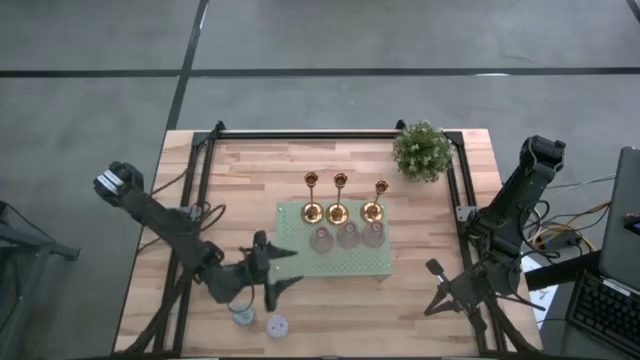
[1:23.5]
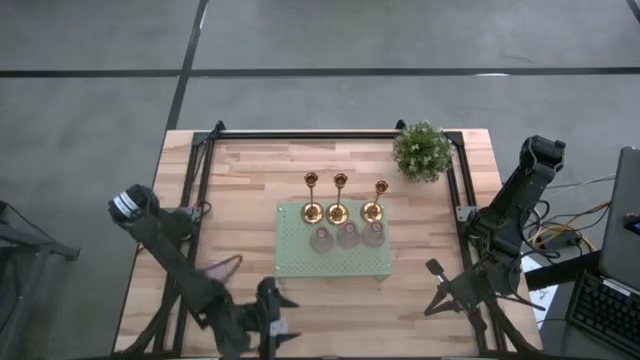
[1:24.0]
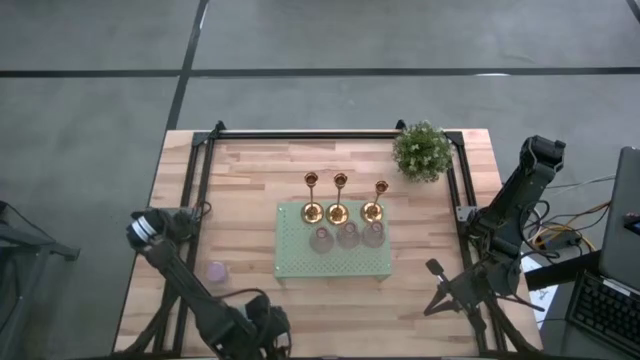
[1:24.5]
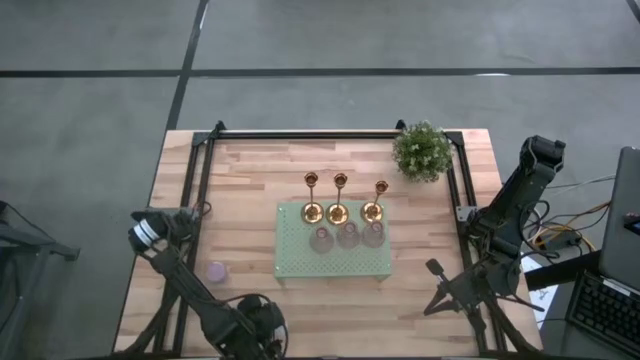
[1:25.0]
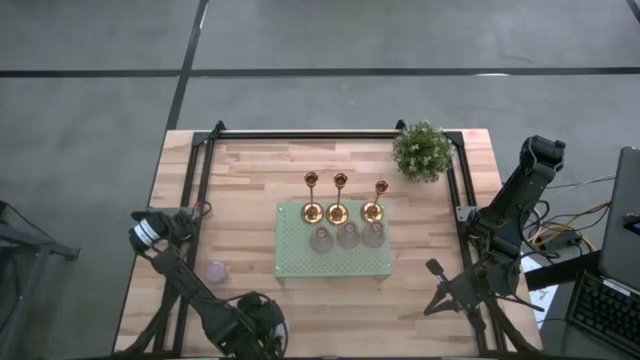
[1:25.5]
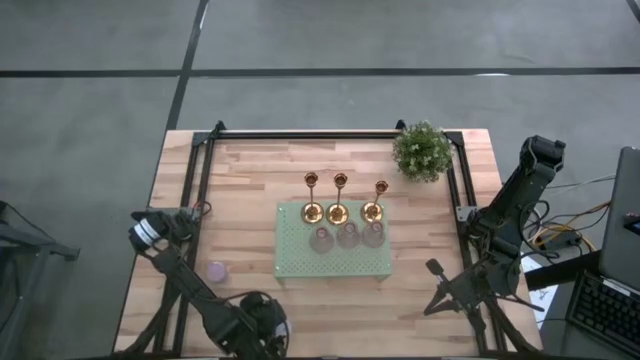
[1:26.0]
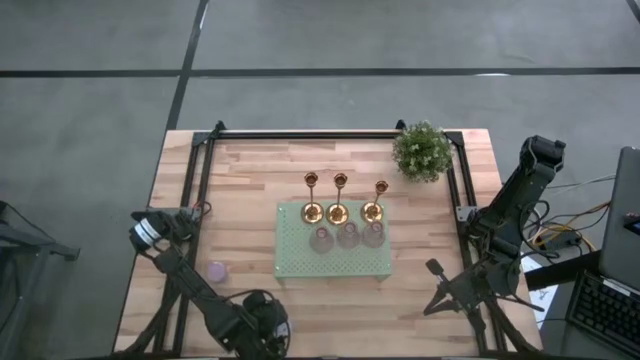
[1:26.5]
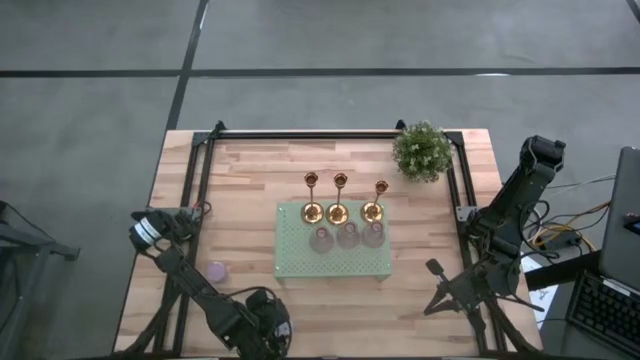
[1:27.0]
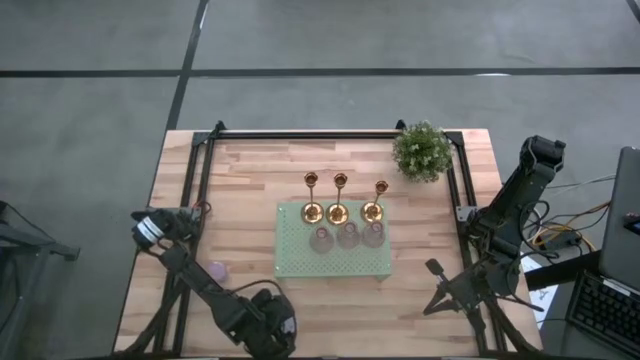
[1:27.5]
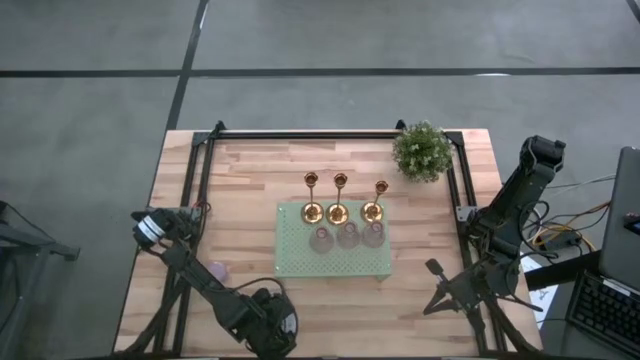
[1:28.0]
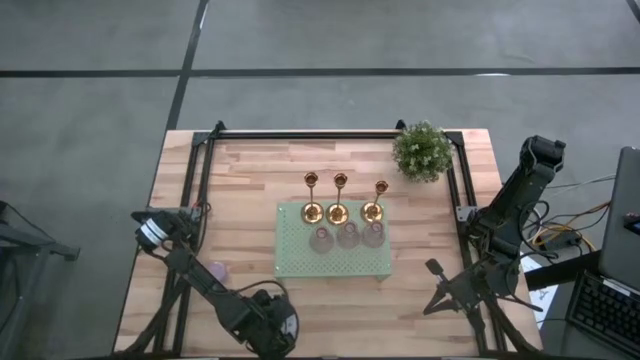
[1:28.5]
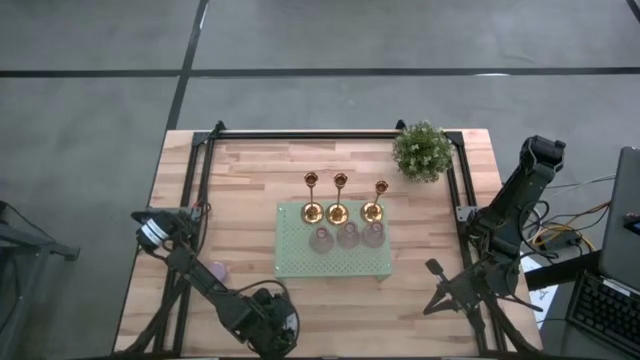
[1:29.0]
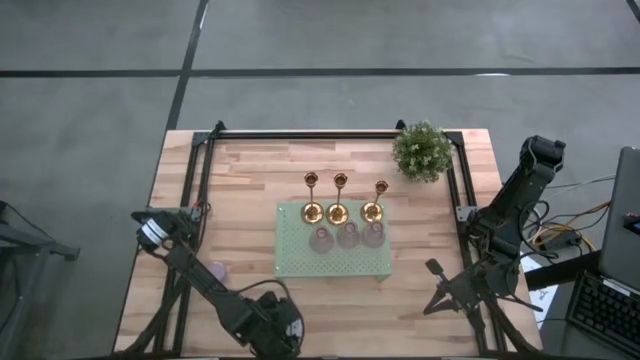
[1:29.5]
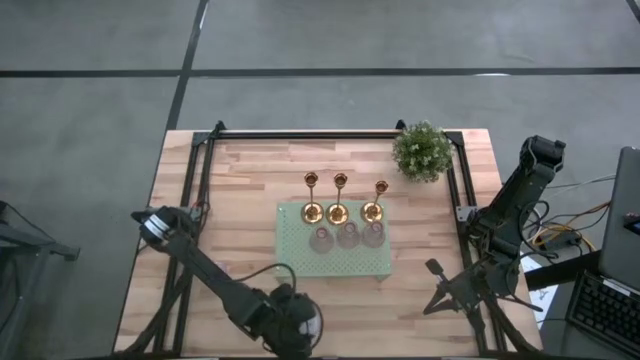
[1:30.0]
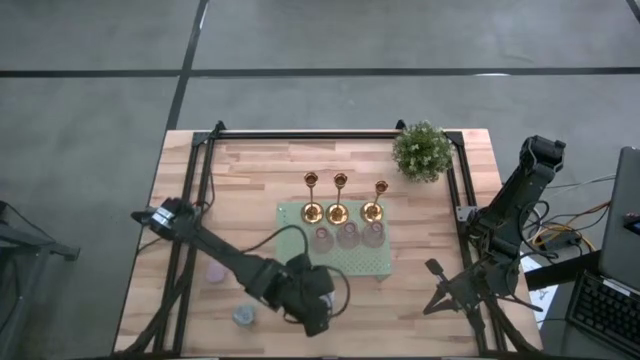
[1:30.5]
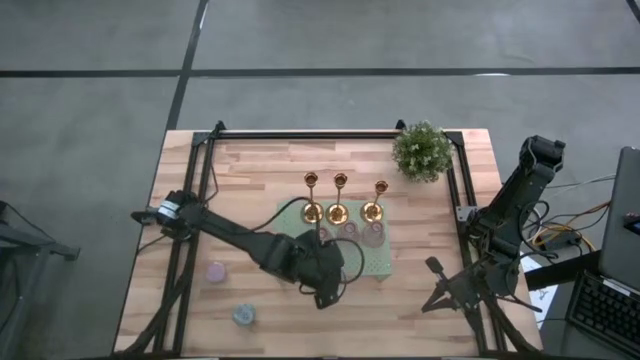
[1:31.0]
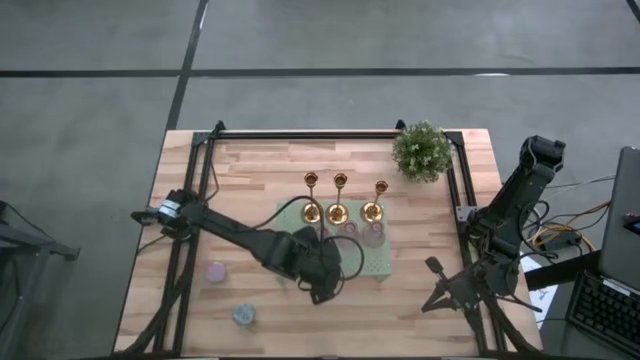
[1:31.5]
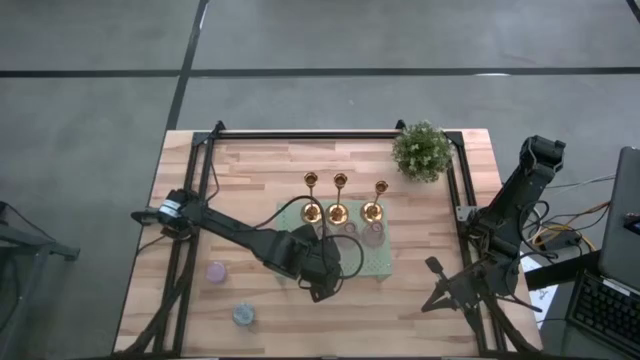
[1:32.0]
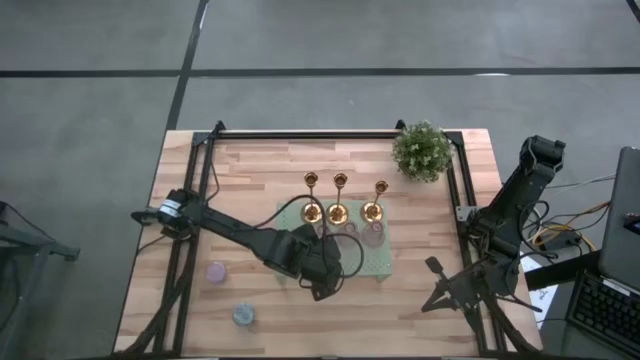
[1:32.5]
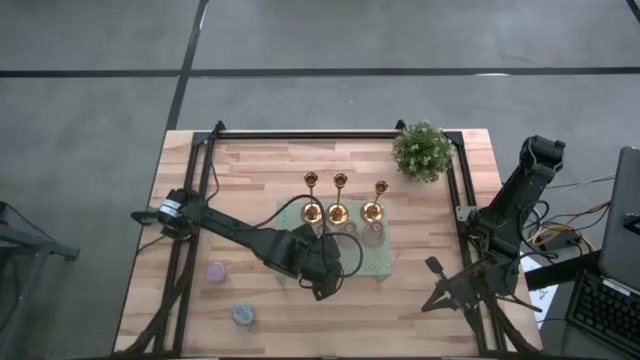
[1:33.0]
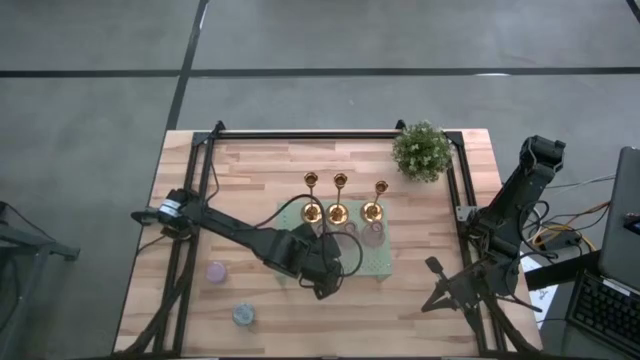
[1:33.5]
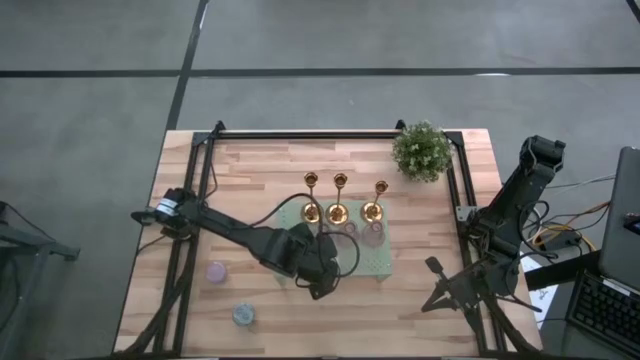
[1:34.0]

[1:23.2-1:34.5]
Task: Pick & Place candle stick holders
Put the white scented candle on the shelf

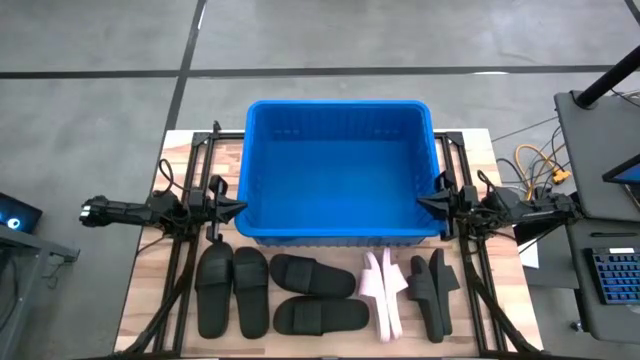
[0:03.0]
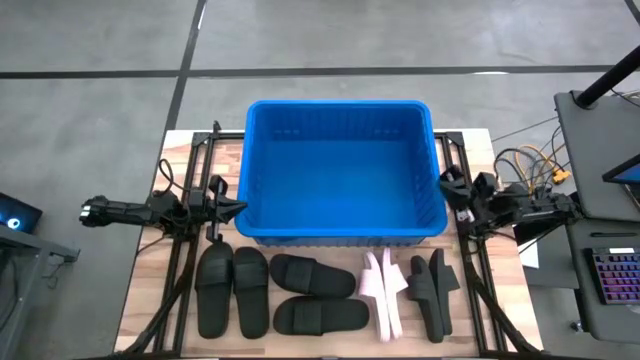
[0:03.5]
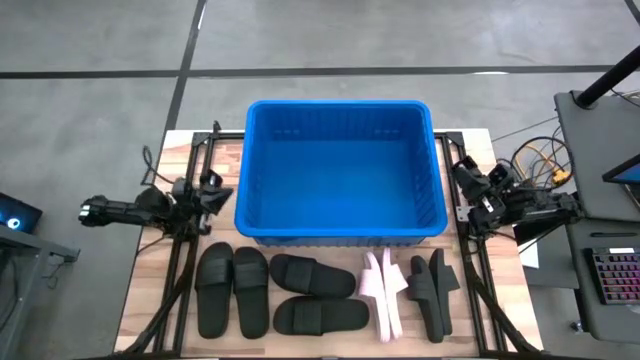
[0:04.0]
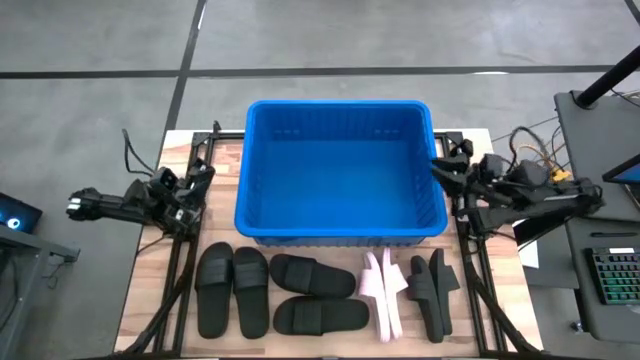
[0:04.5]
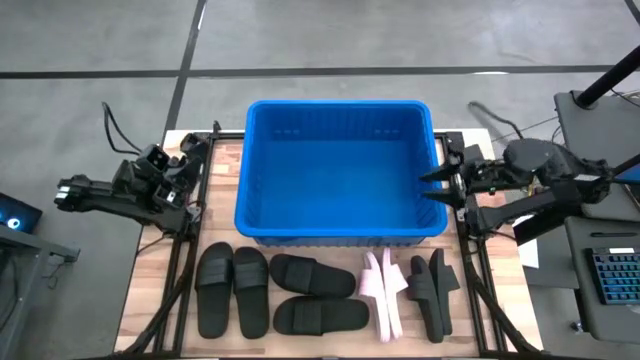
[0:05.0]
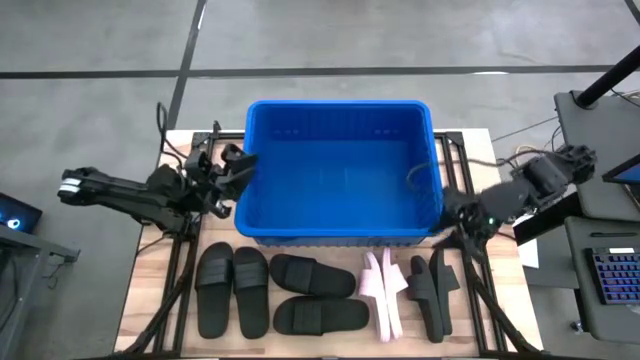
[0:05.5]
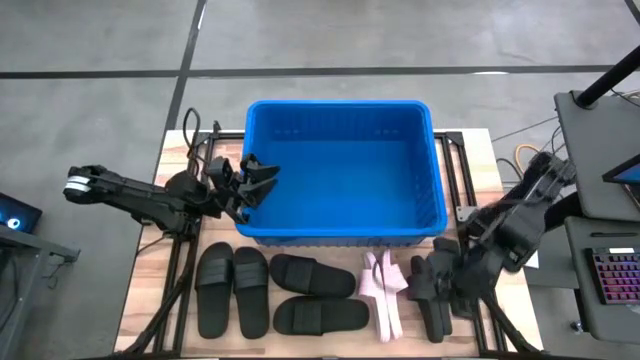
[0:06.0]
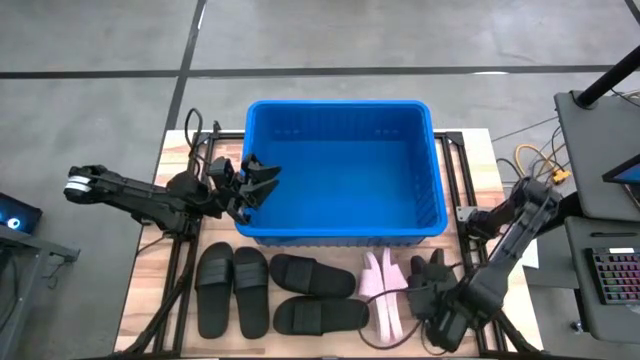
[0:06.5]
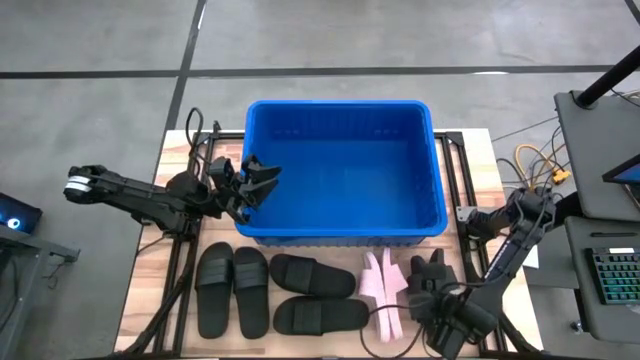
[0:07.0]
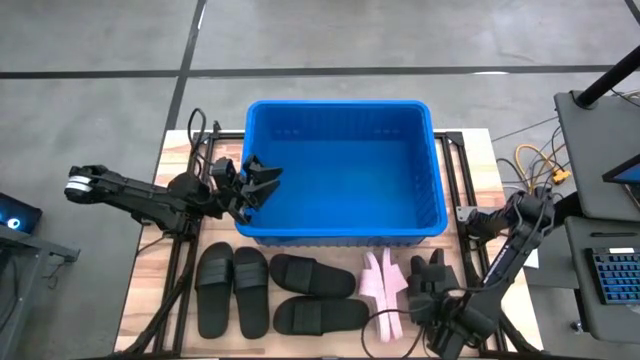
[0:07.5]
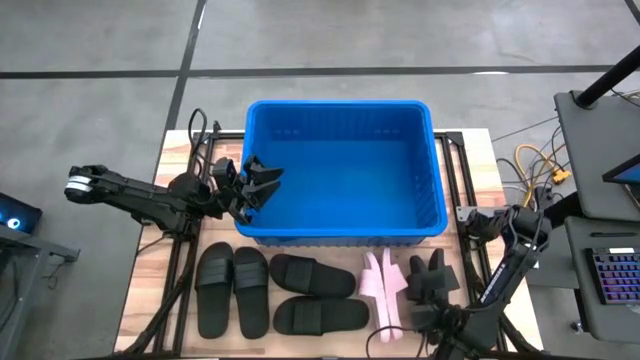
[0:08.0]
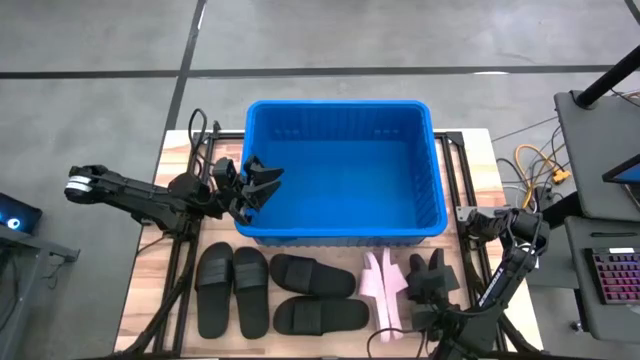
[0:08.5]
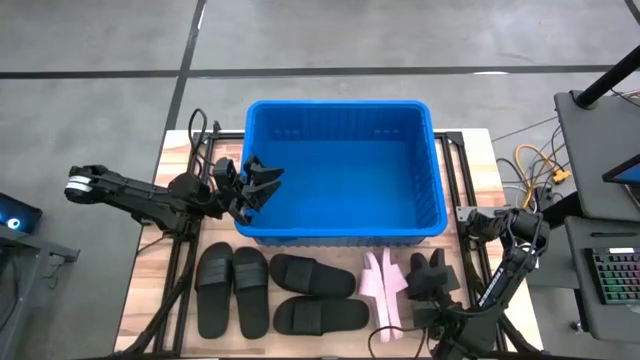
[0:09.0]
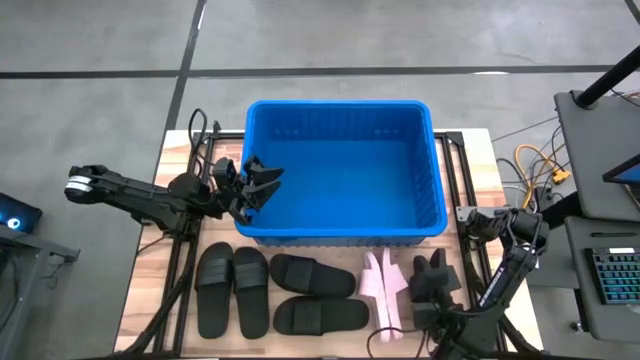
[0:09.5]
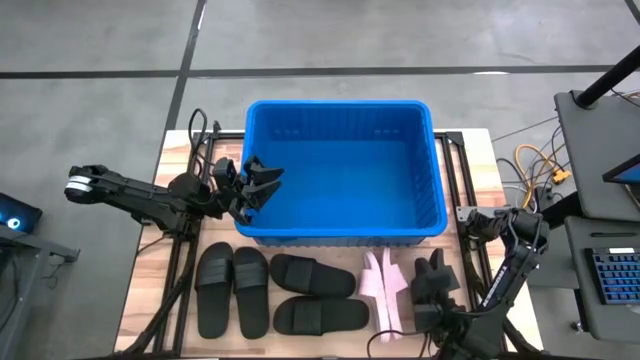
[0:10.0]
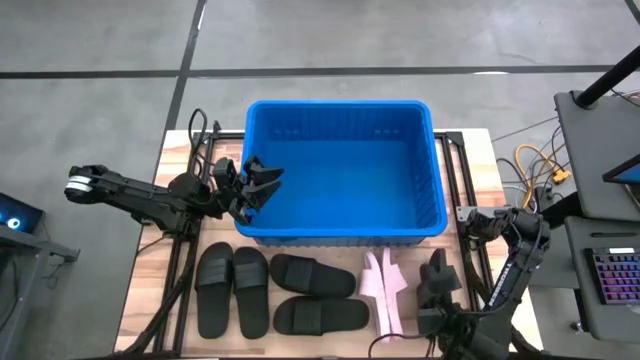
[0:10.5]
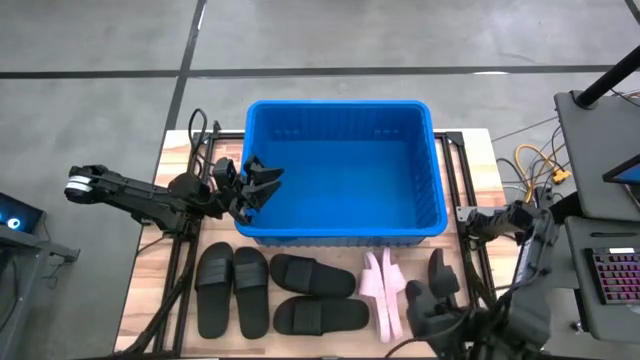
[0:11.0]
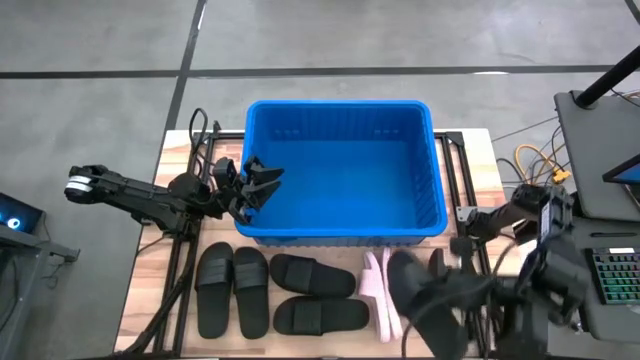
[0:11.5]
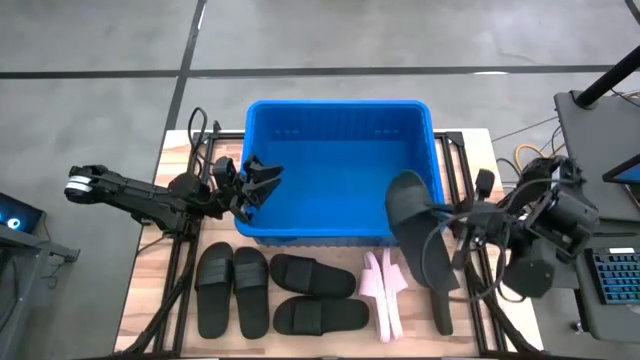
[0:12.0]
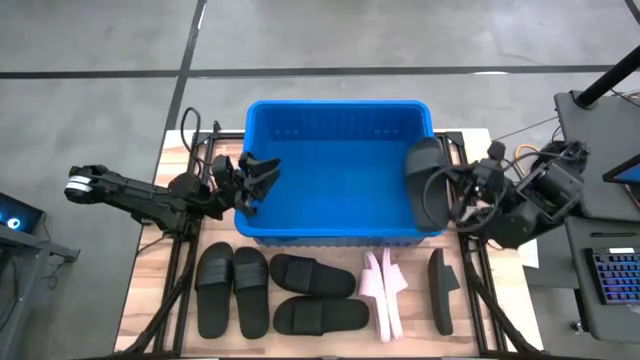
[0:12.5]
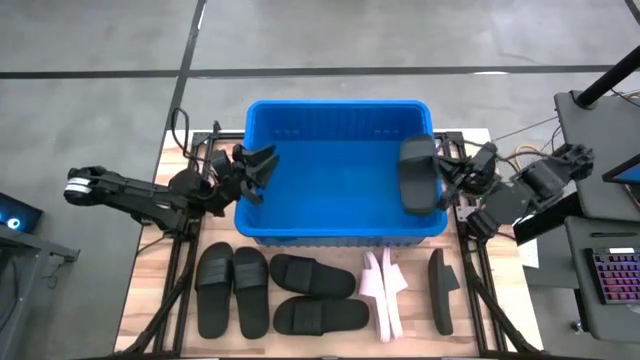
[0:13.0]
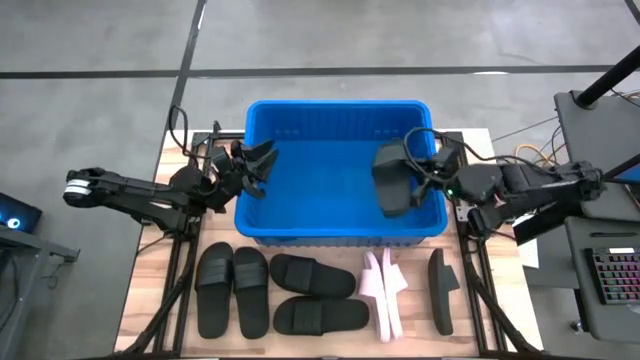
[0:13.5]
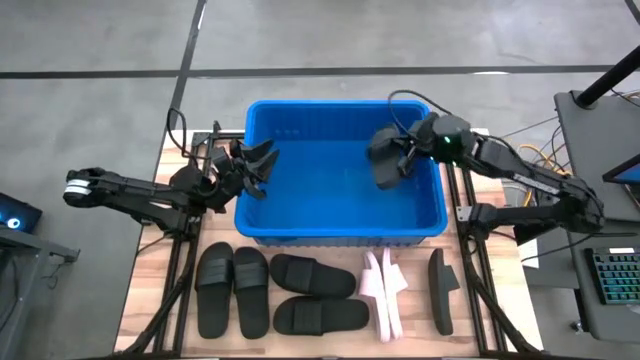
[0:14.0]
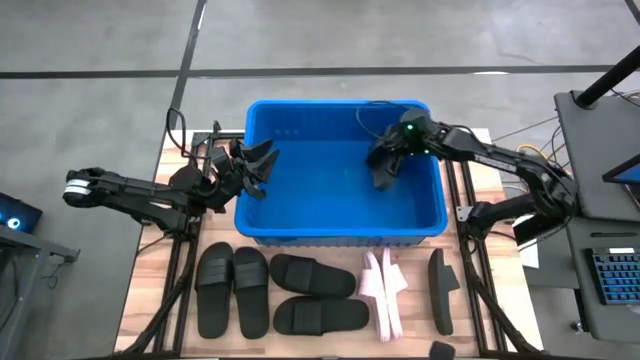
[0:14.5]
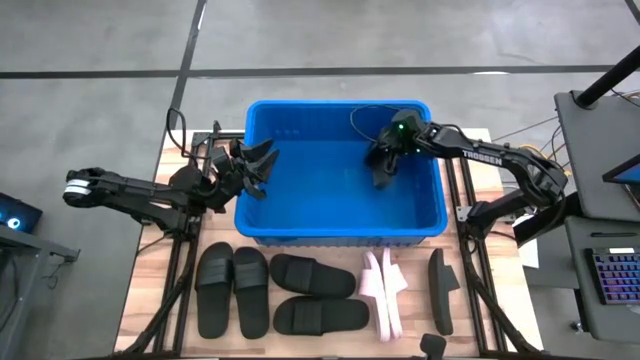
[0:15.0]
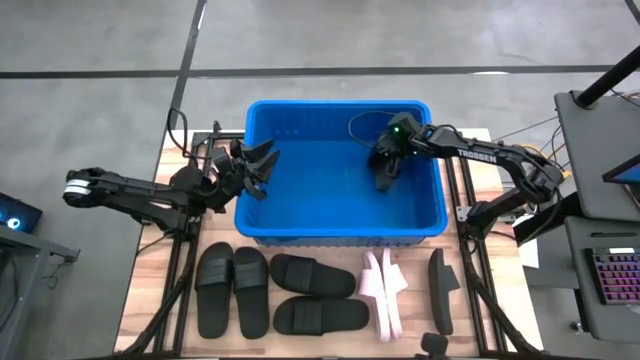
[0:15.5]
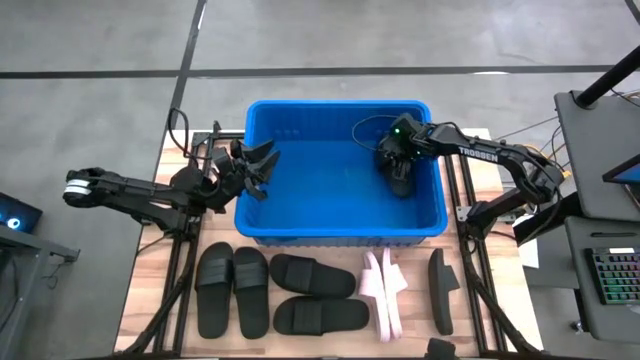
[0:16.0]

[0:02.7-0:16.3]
Task: Pick and place slides into bin
Put the black slide into the blue container
